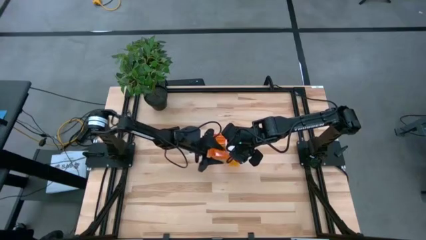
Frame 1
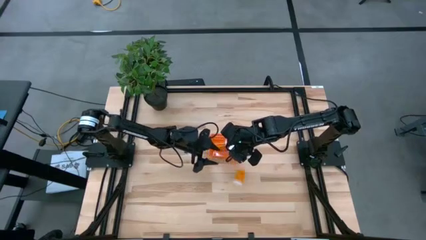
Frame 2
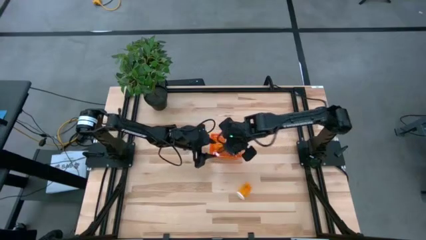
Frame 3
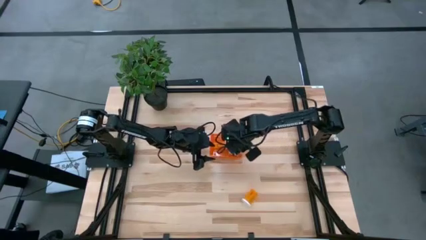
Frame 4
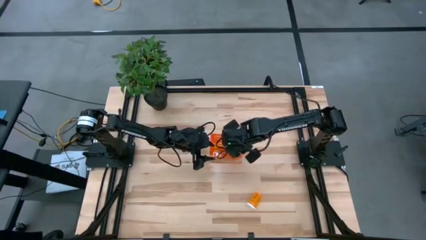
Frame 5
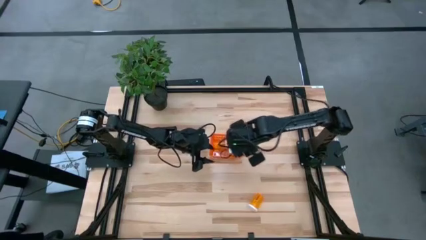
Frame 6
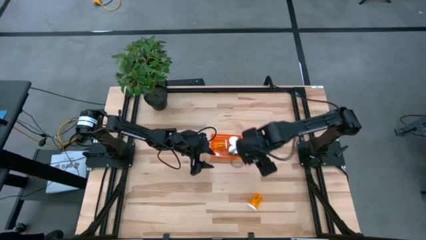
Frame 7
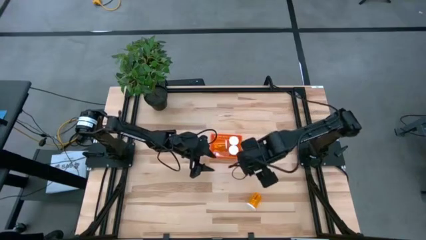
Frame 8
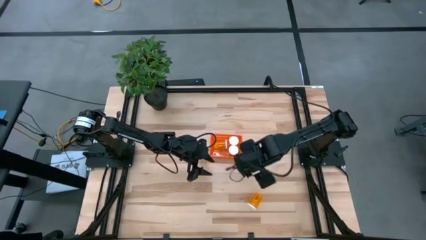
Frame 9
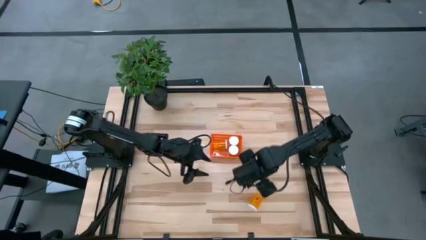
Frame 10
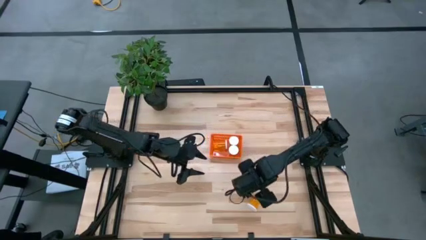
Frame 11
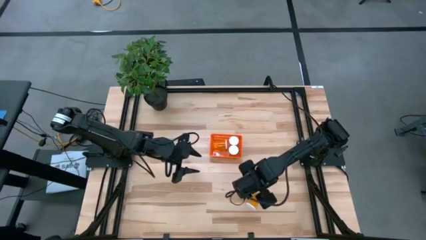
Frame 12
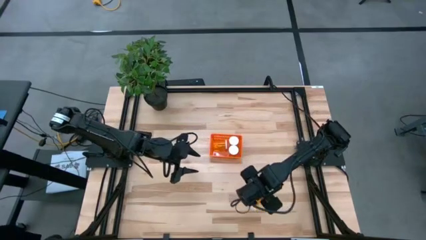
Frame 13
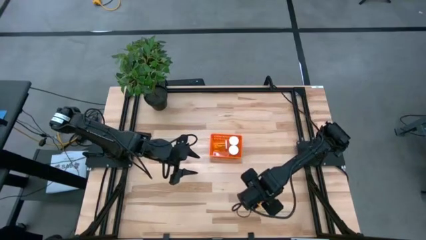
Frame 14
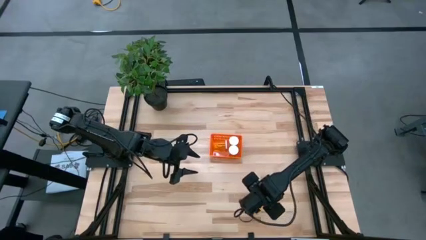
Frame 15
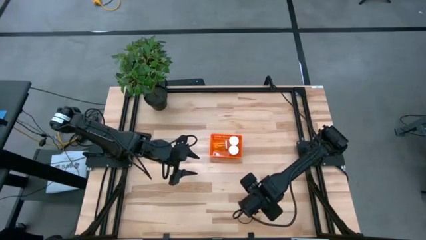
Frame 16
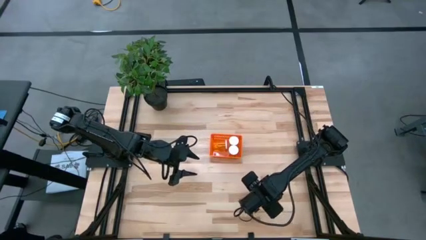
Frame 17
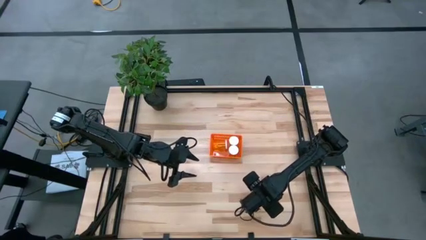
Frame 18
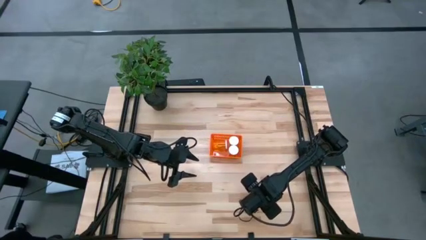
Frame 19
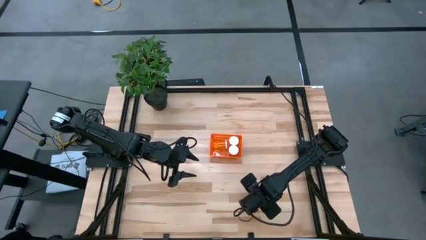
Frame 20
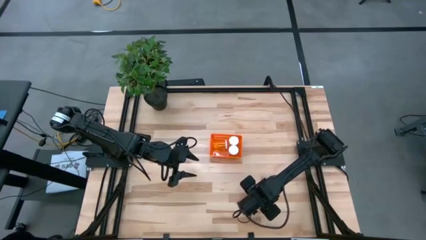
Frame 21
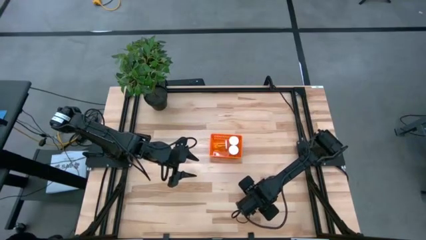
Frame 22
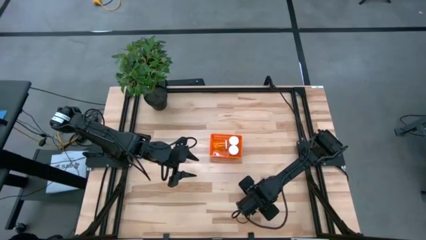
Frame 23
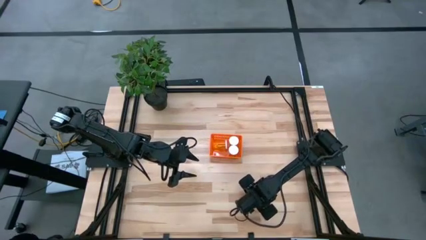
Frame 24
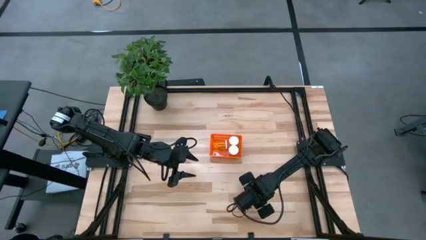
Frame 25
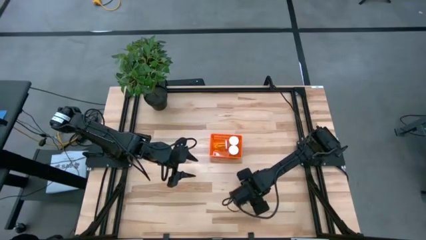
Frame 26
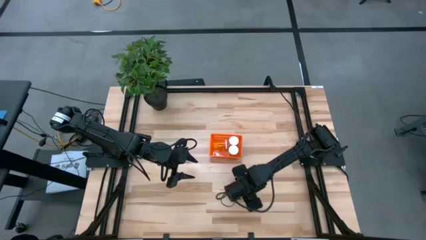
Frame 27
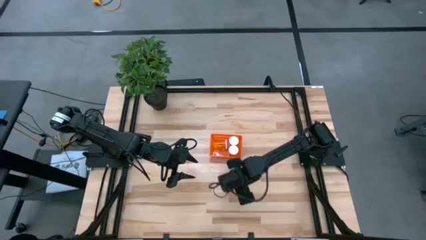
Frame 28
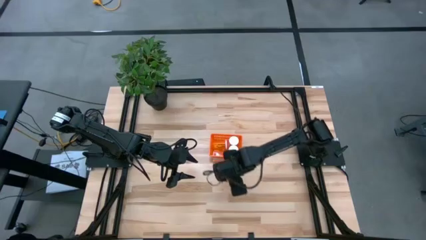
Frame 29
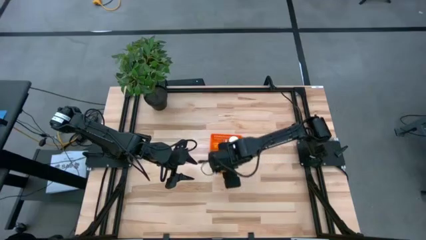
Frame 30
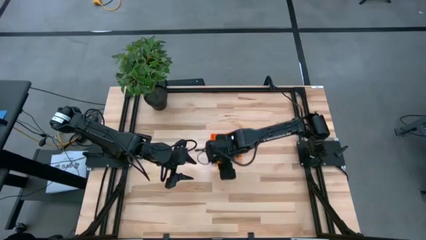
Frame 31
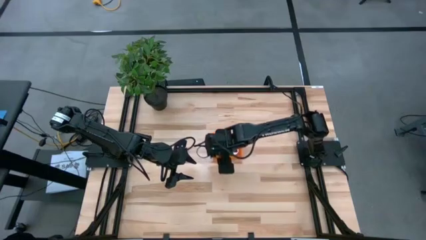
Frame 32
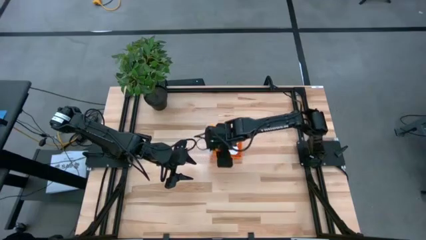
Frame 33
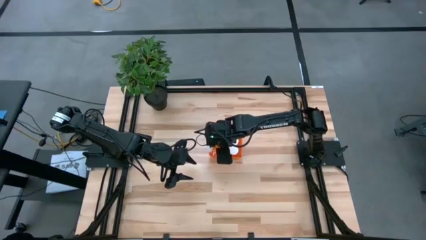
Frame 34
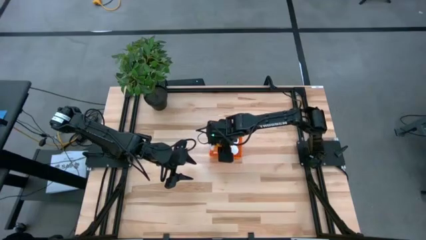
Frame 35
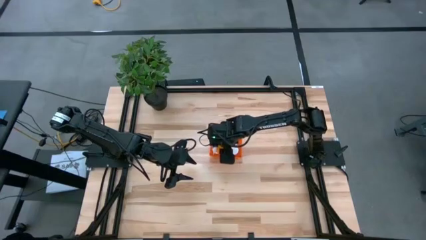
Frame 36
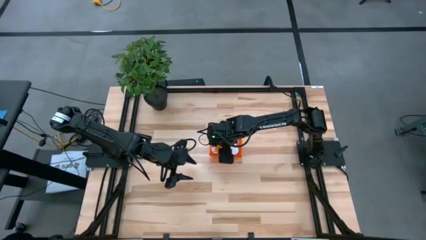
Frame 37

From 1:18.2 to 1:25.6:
Task: Pick and place pill bottles into a basket
Put the orange medicine bottle into the orange basket

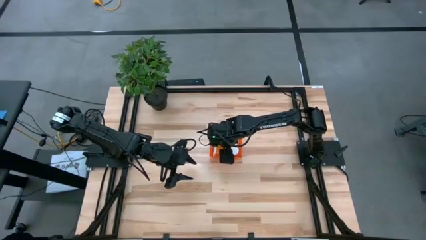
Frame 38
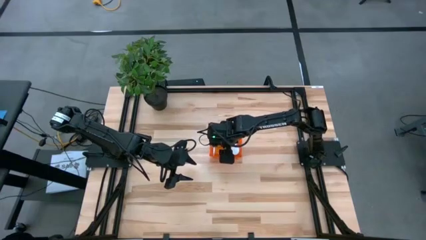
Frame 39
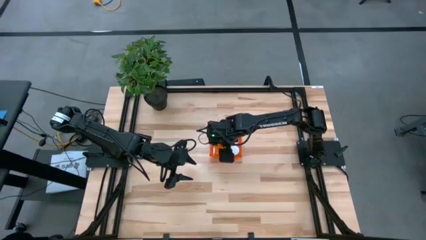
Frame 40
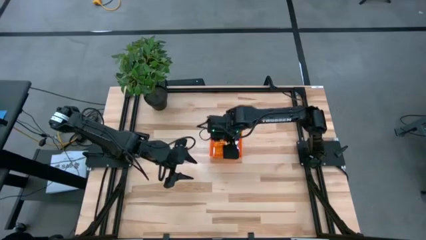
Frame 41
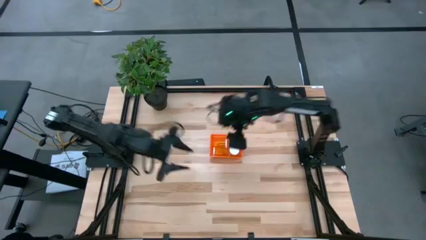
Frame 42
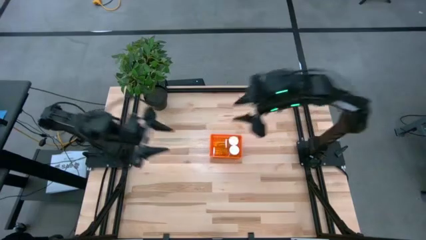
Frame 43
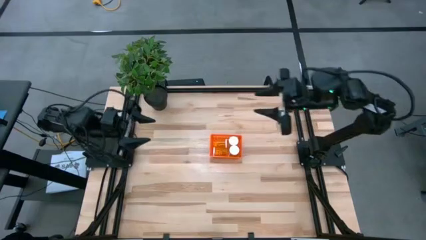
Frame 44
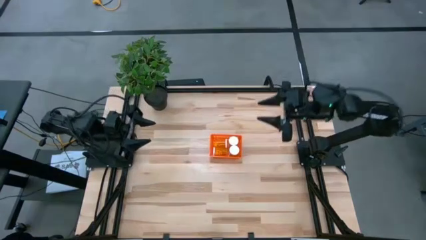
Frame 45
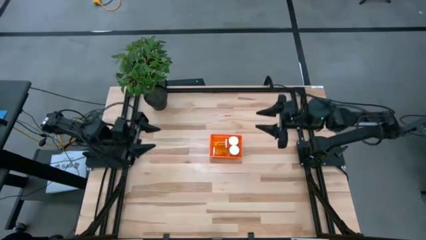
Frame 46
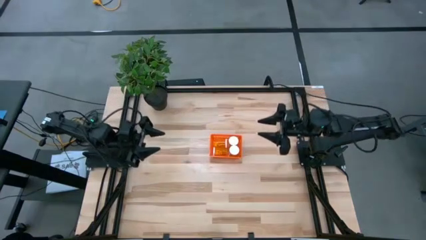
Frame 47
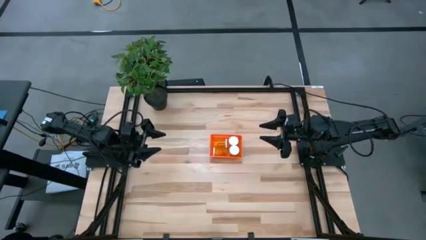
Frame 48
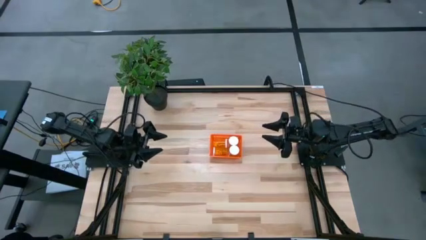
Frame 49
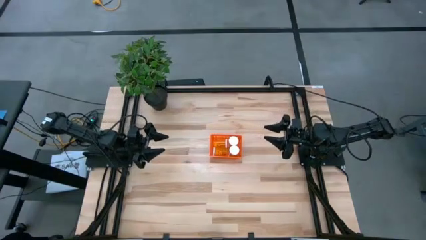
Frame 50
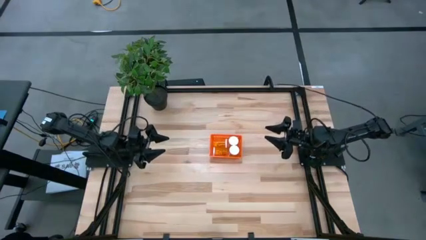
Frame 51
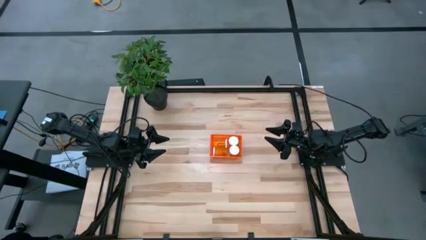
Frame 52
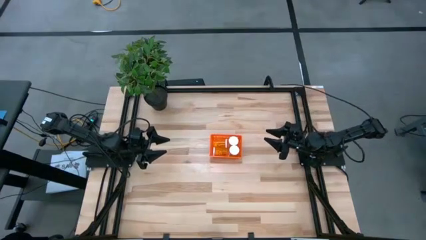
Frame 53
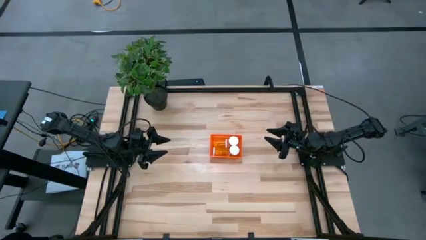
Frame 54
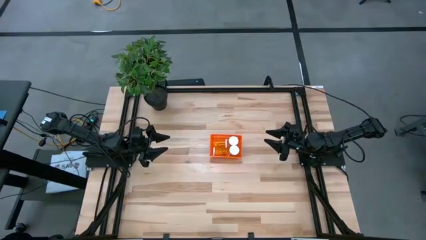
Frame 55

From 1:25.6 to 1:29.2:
Return to Home Position

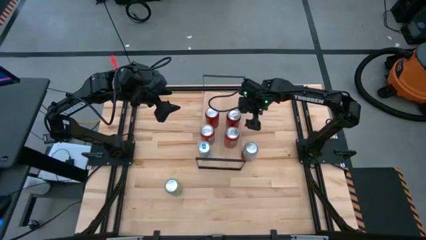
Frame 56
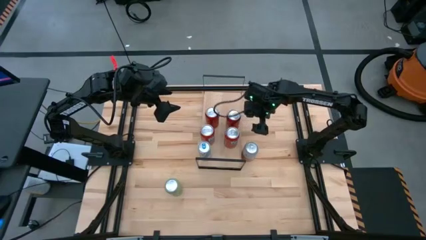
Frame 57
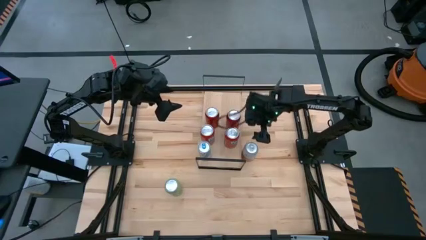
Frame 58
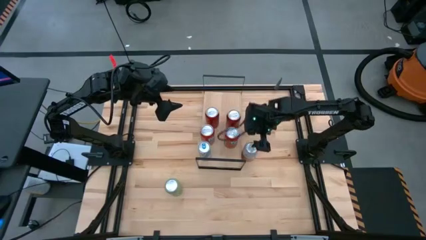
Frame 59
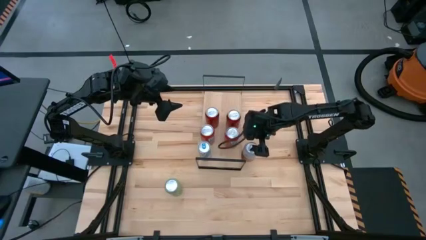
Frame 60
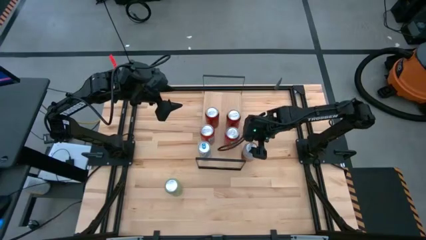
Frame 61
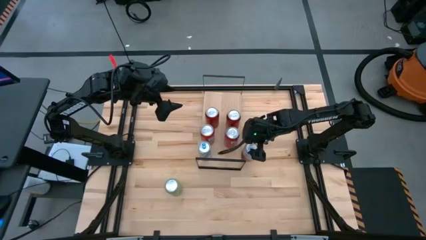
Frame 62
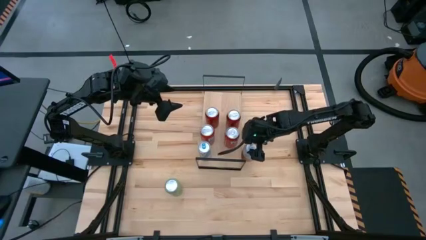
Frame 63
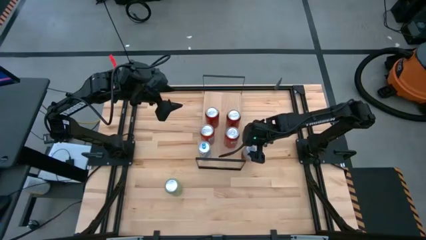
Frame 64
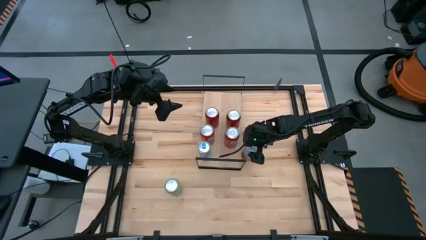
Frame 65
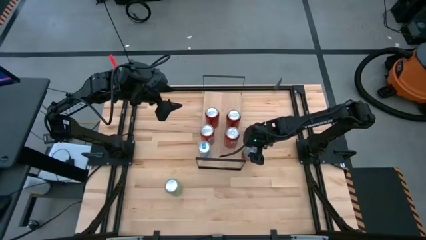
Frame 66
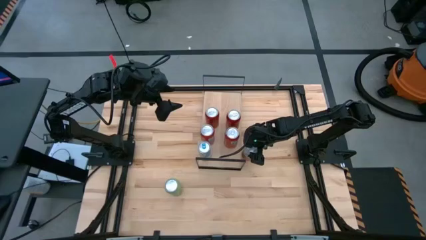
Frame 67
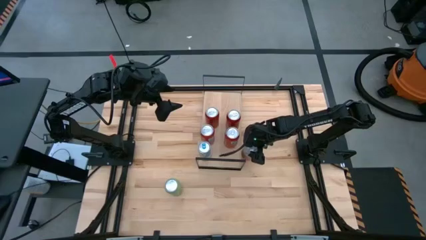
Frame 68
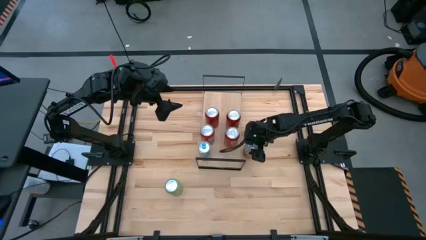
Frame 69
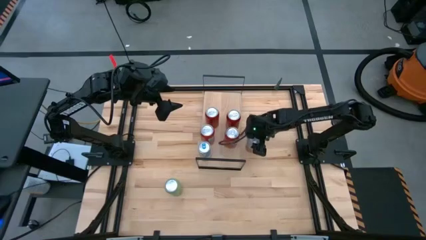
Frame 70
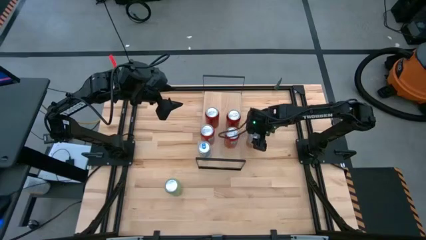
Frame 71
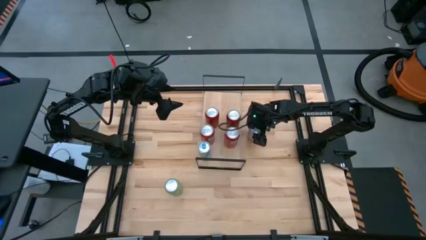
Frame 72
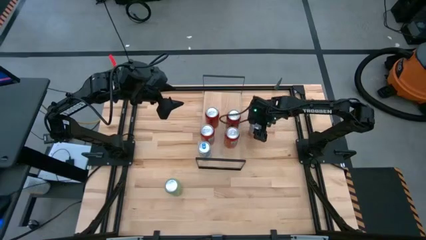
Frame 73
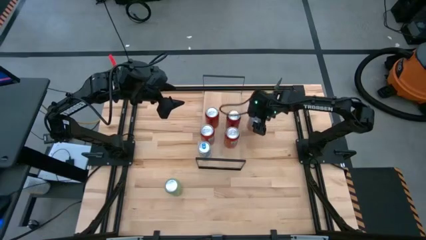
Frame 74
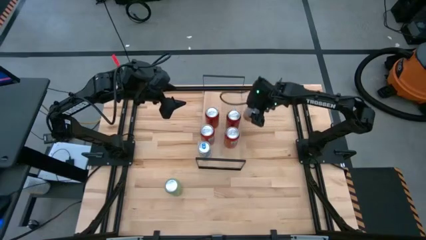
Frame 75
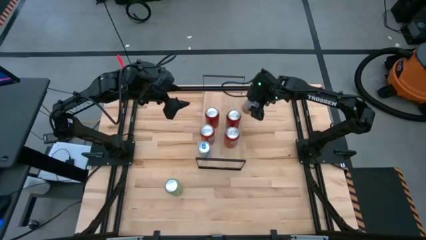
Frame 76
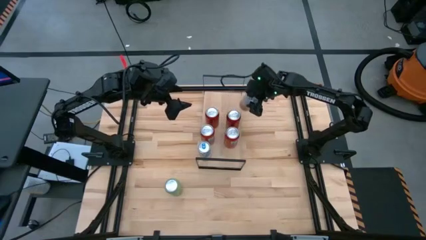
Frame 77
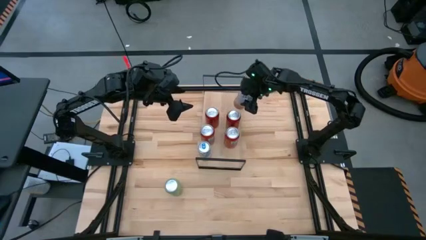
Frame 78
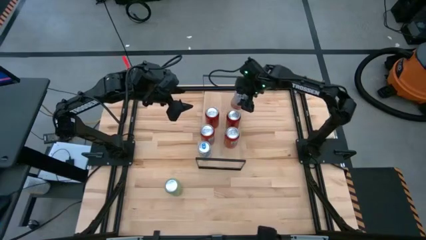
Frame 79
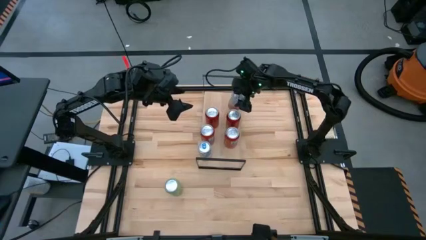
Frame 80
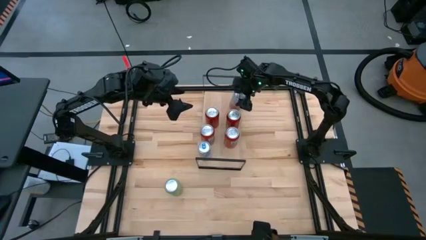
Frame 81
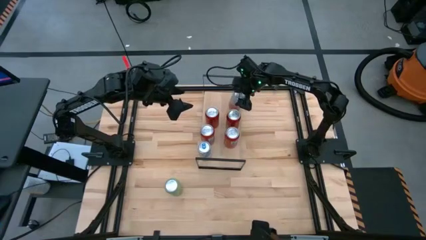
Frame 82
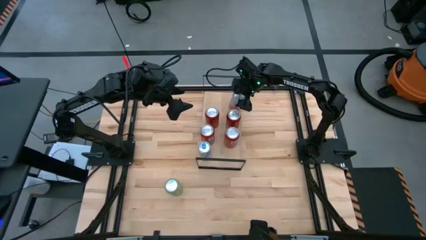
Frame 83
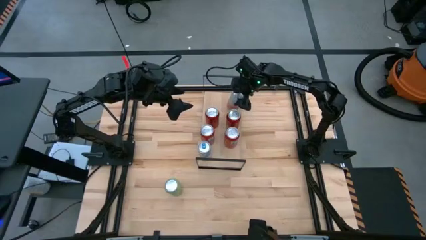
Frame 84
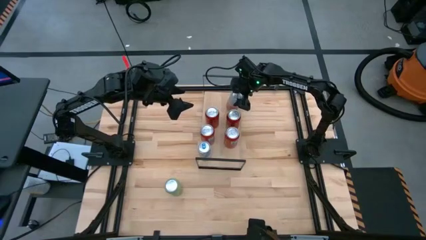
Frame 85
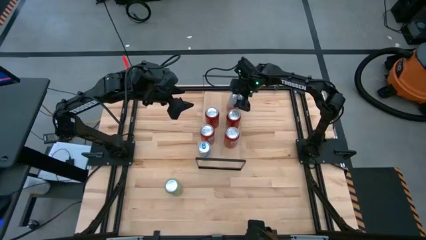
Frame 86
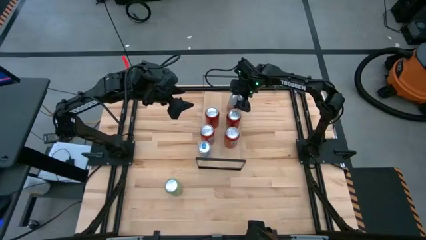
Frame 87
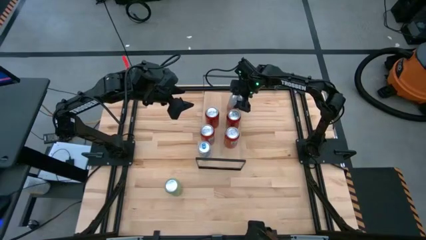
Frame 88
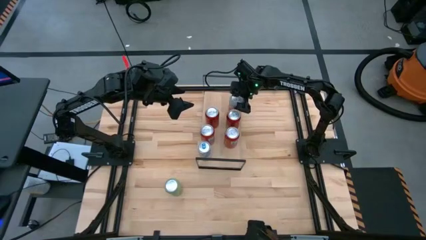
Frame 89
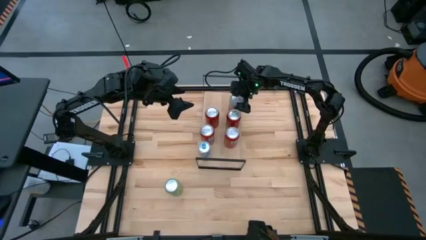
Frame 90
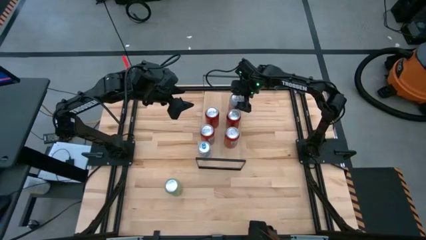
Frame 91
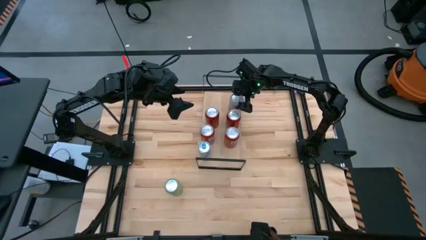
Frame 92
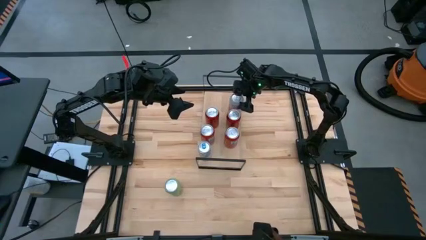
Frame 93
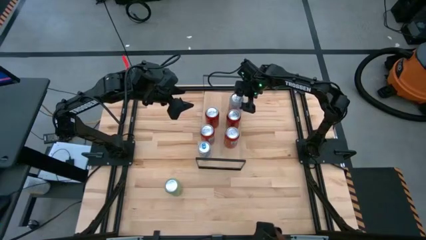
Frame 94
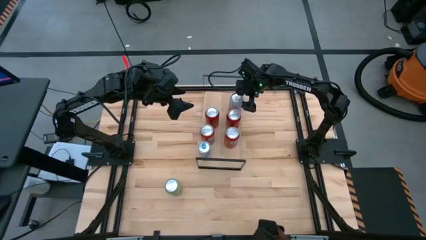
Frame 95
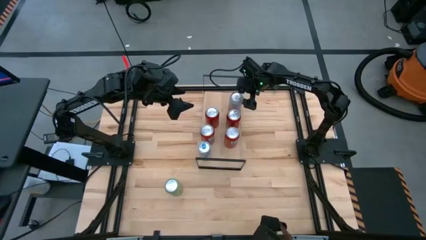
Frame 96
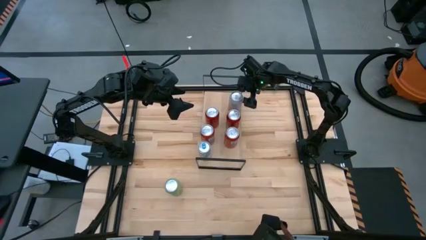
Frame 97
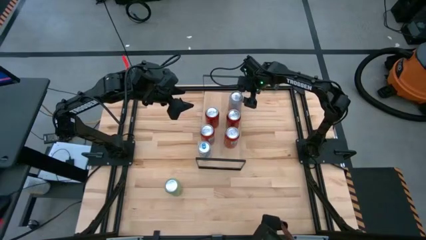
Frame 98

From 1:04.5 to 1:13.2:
Task: Place canned beverage on shelf
Put the pink white soda can on the shelf
